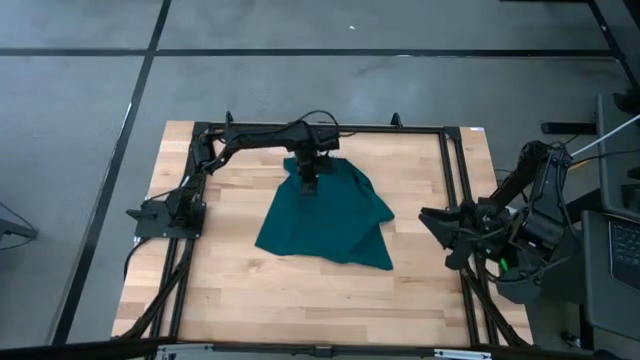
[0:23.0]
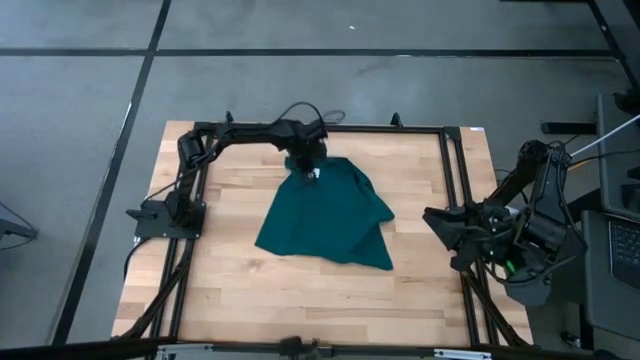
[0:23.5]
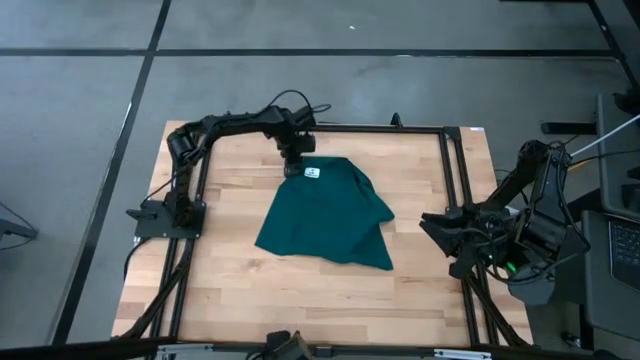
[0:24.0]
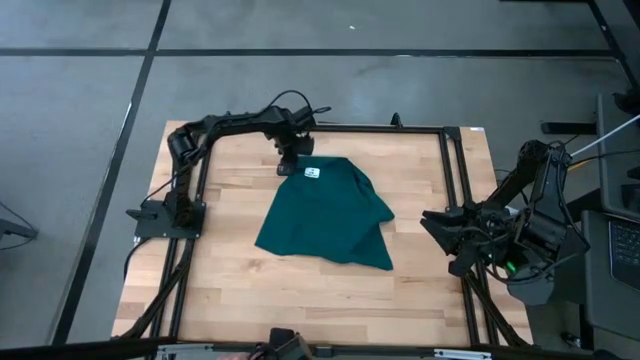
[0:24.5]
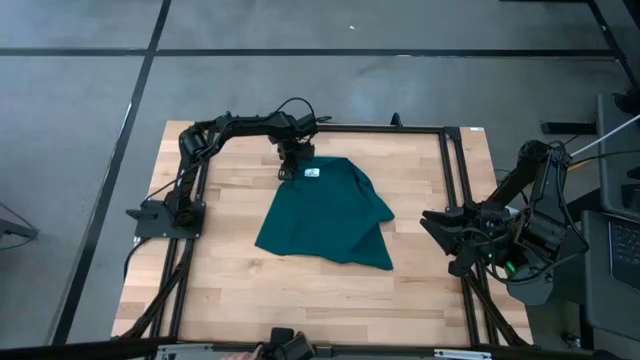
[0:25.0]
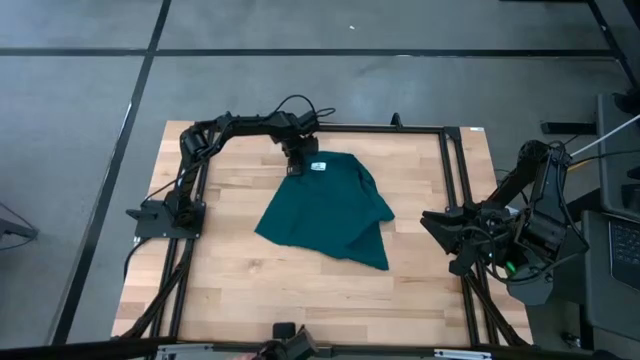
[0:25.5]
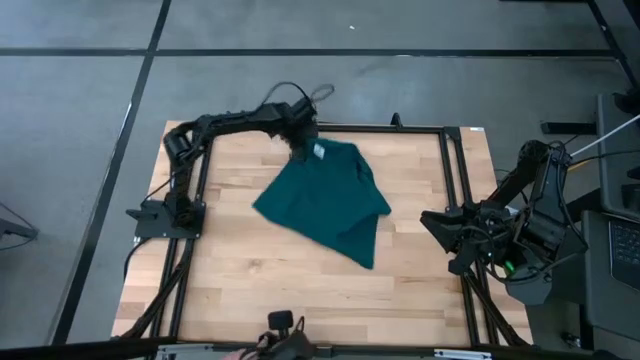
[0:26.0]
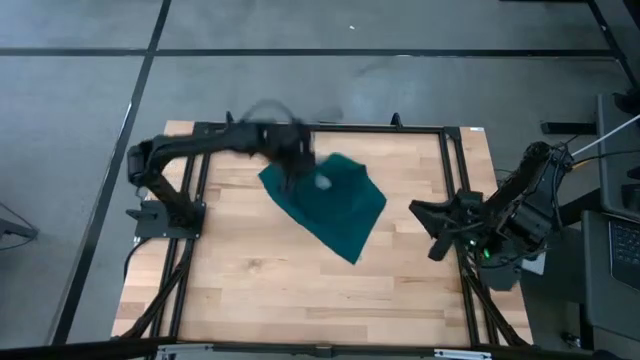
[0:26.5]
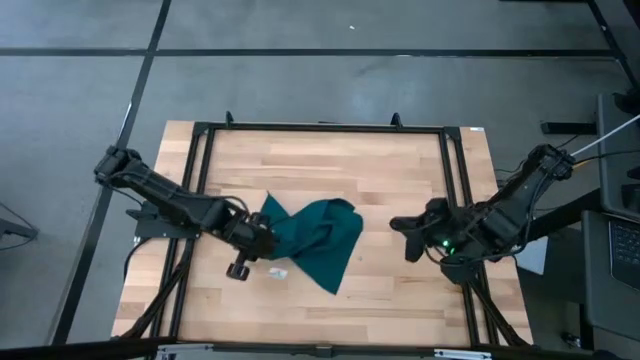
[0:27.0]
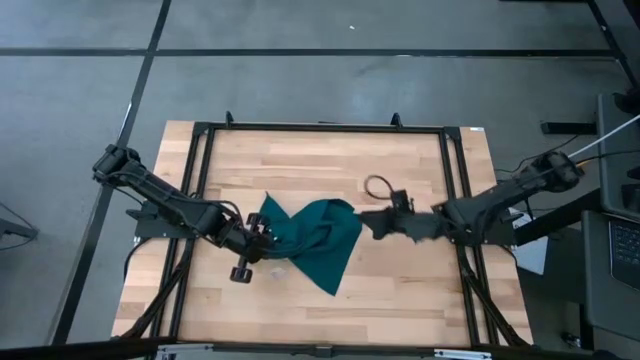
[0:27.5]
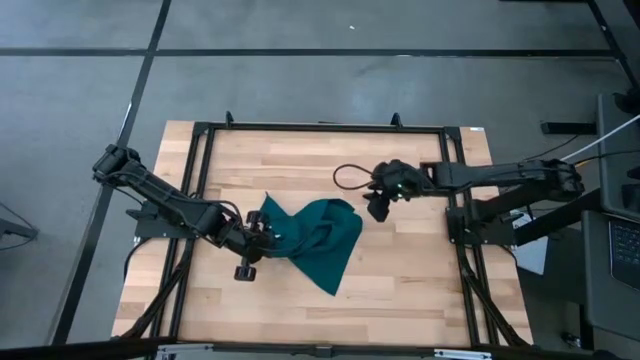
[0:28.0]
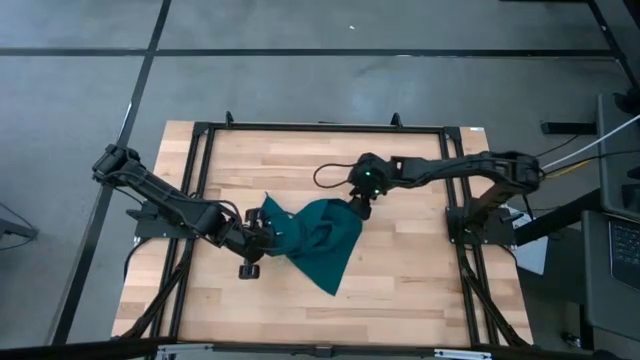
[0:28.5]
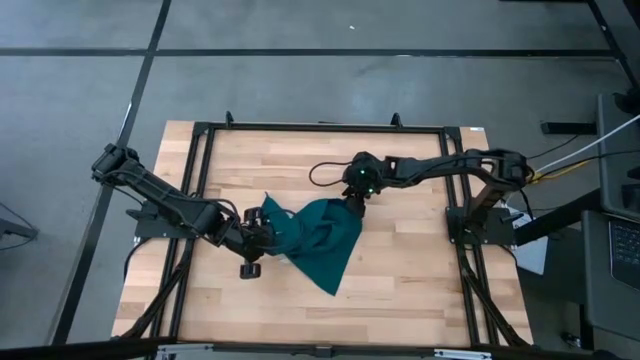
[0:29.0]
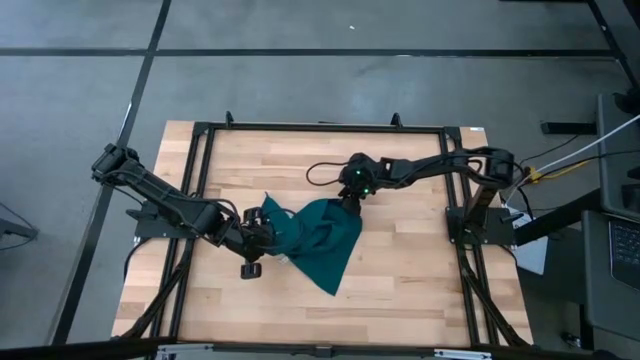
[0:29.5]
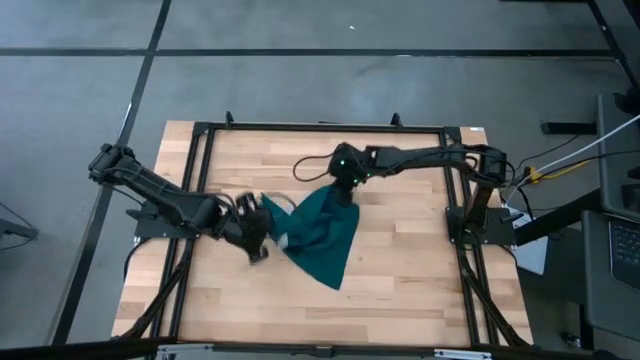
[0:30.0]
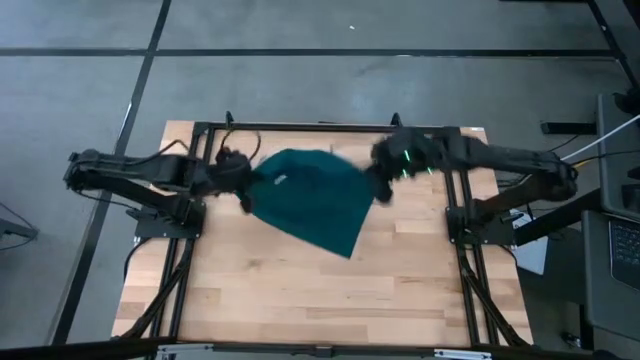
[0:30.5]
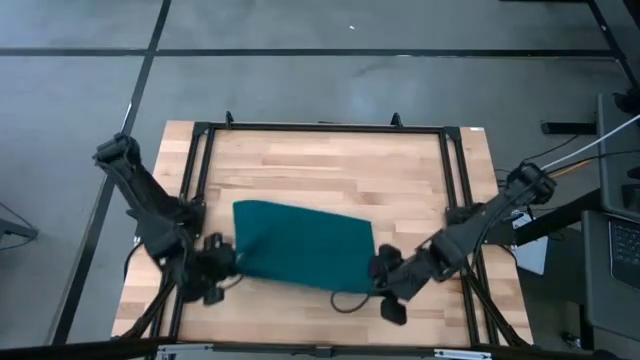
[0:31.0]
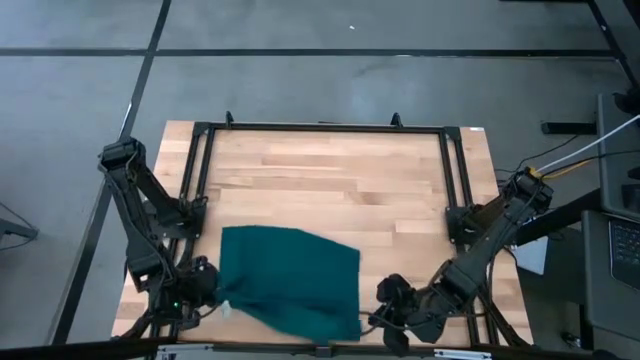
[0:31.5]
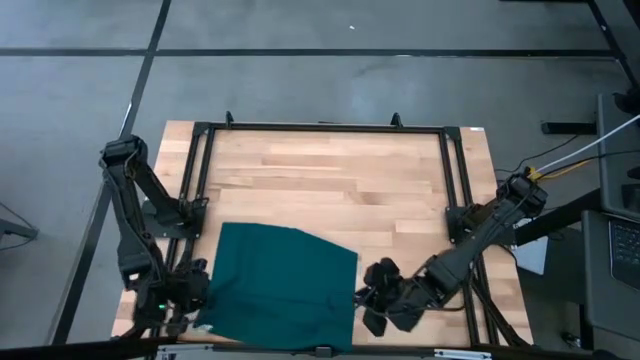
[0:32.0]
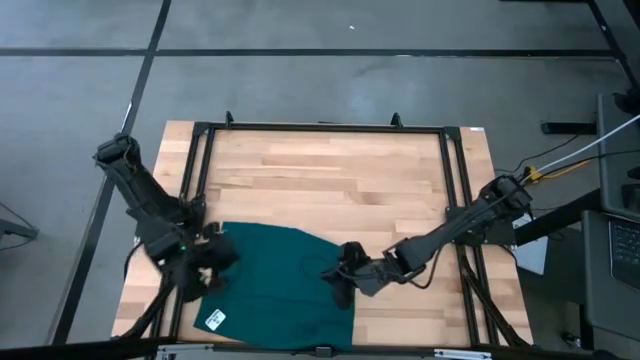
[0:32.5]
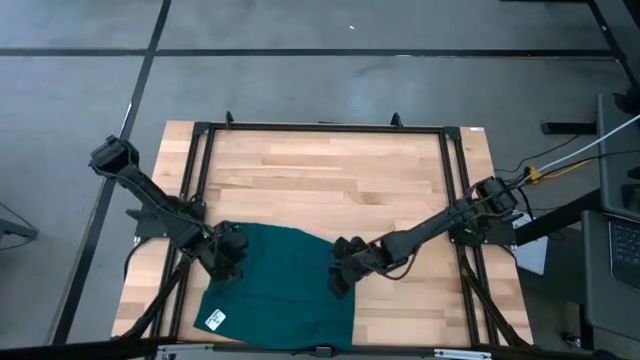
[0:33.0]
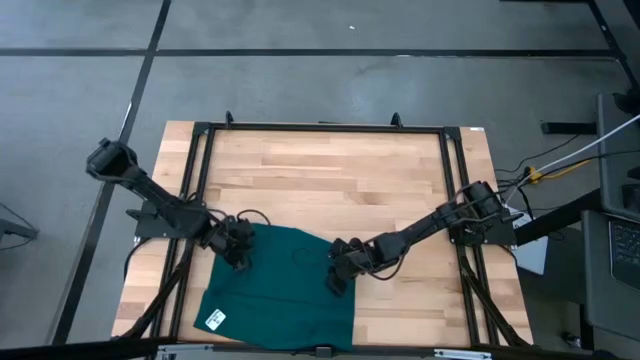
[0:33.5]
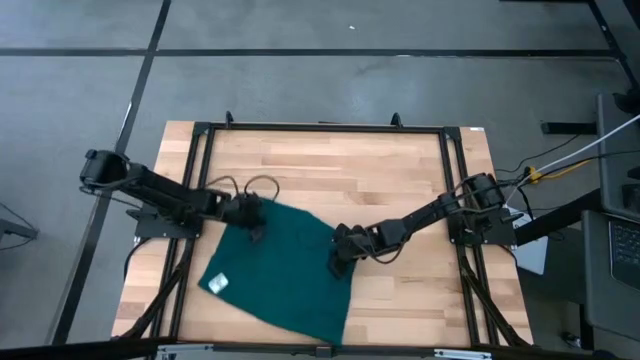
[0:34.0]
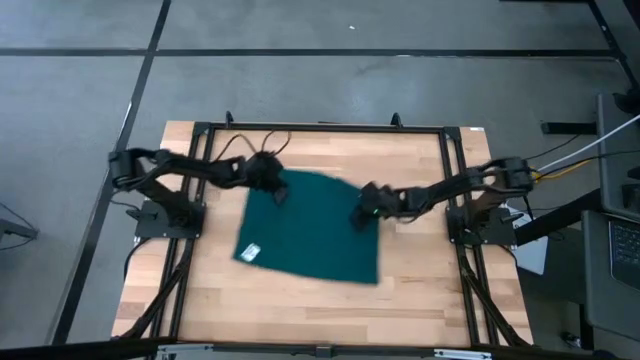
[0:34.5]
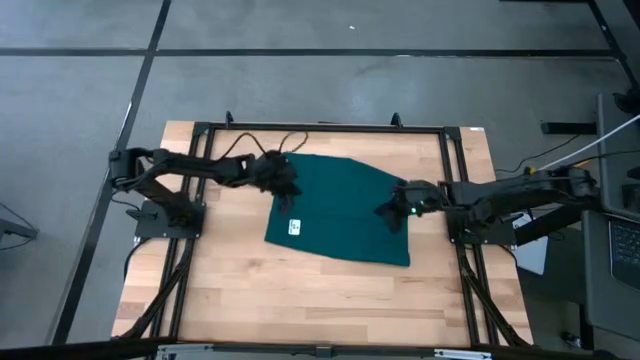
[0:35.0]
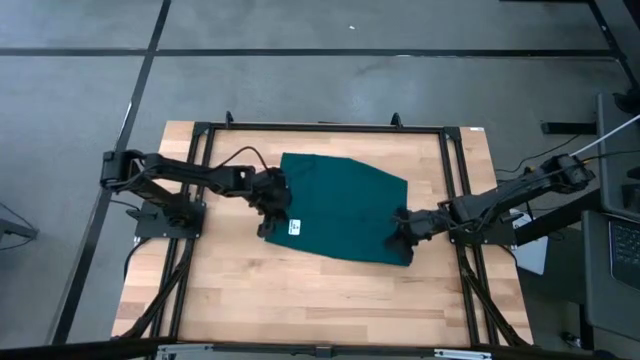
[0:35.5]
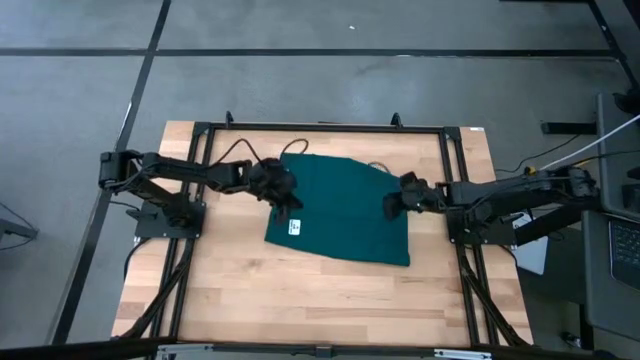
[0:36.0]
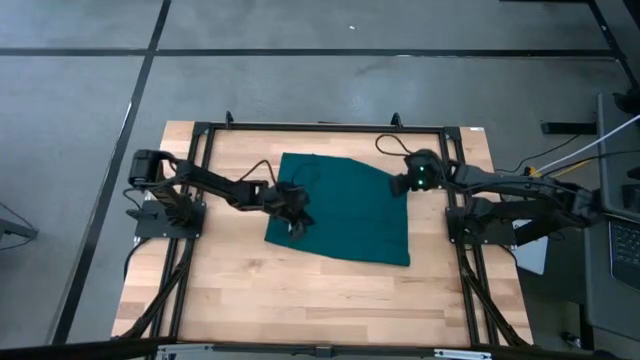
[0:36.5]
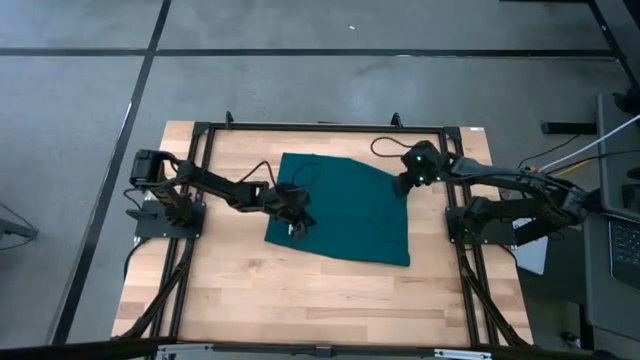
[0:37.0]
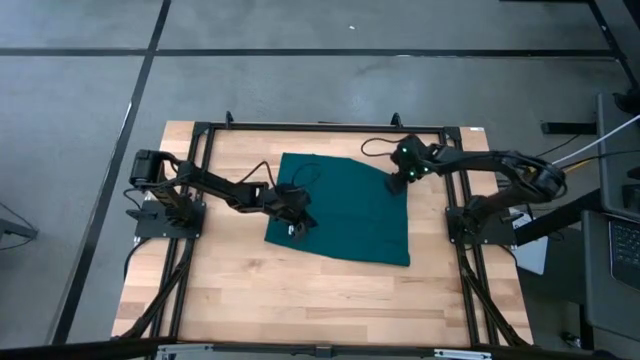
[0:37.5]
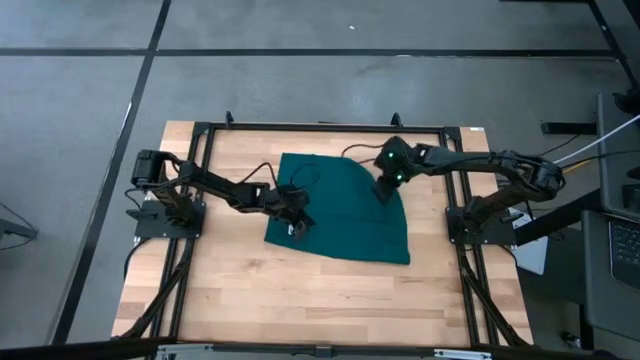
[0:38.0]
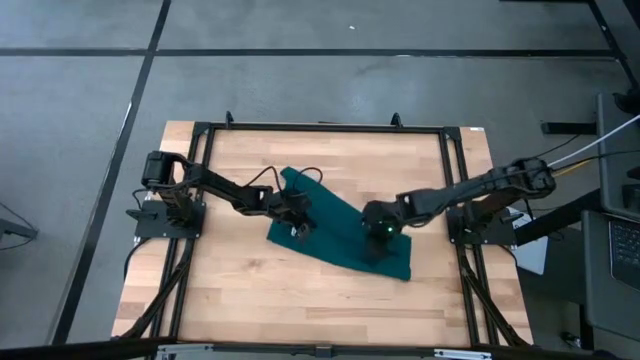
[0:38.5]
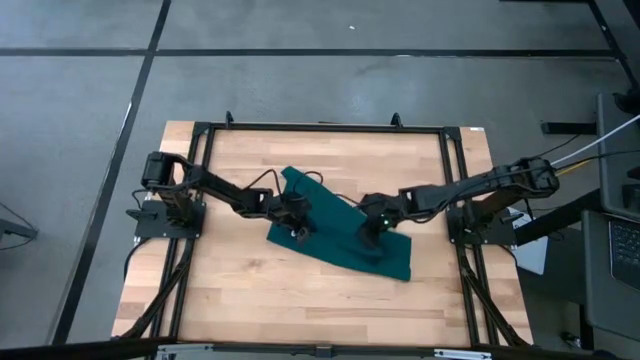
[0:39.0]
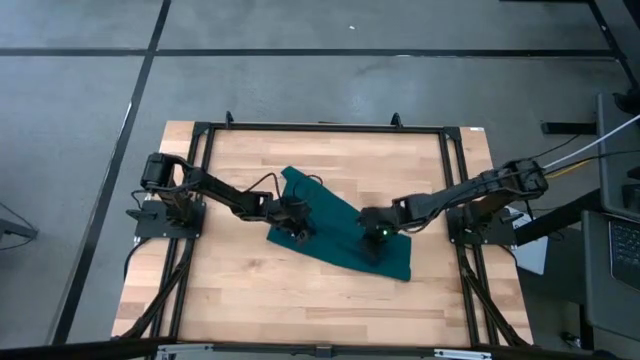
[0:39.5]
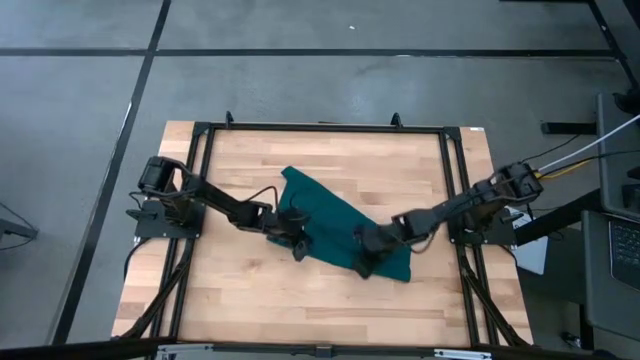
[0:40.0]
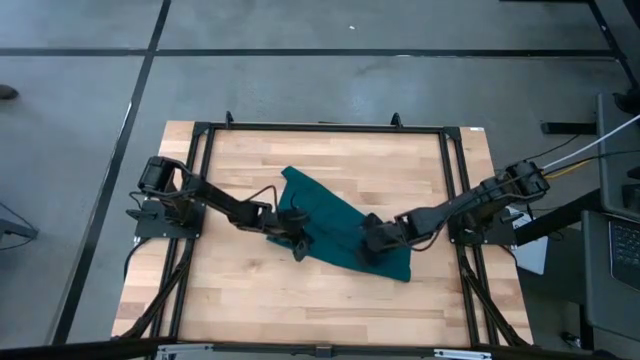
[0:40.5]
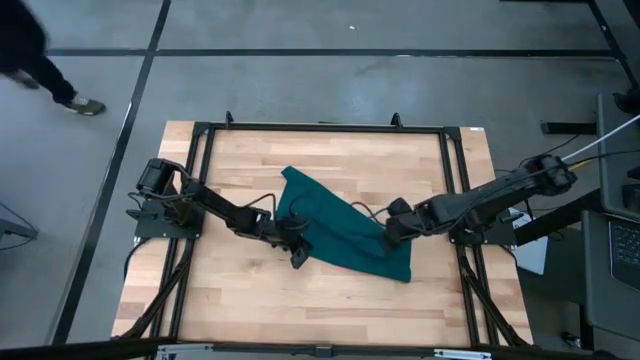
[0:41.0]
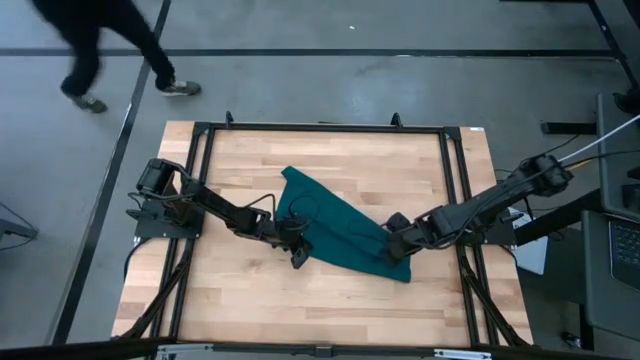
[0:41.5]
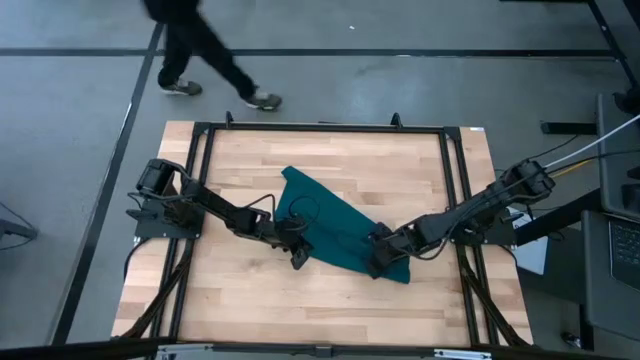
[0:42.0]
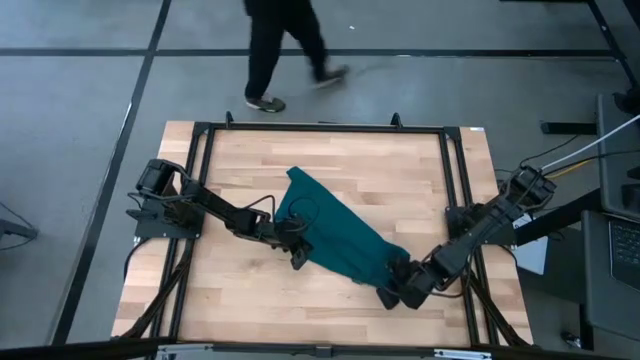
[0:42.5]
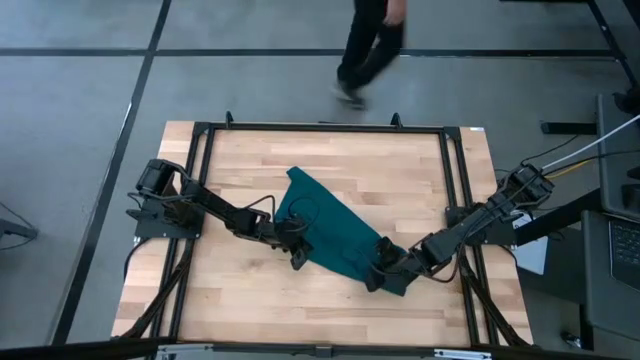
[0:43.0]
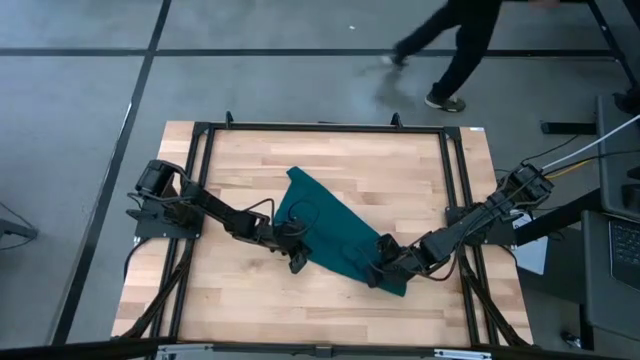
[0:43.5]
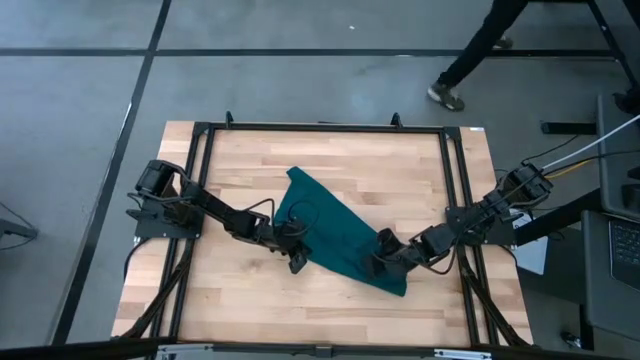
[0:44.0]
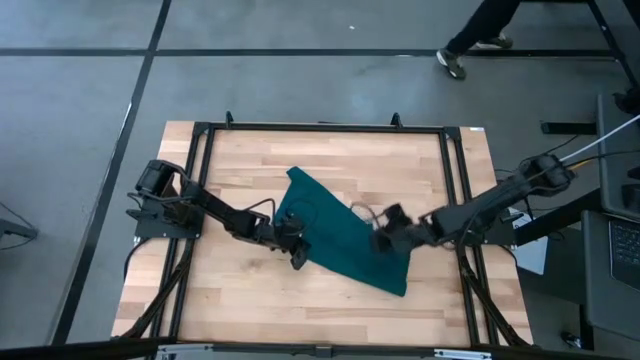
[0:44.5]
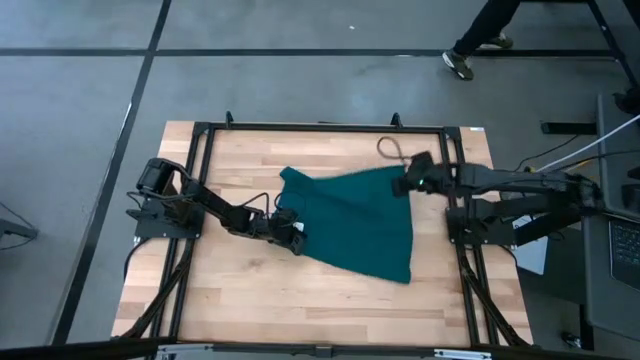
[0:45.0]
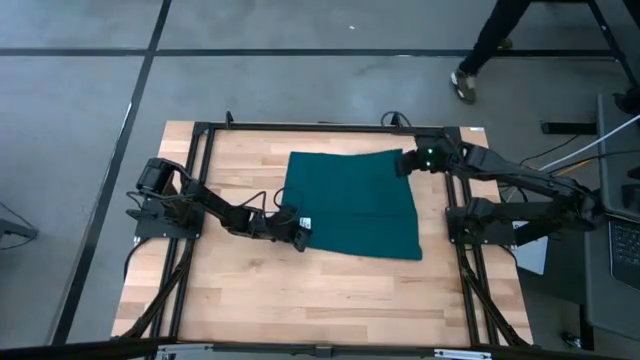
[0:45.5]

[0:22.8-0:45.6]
Task: Fold microfiber towels
Fold the green towel
